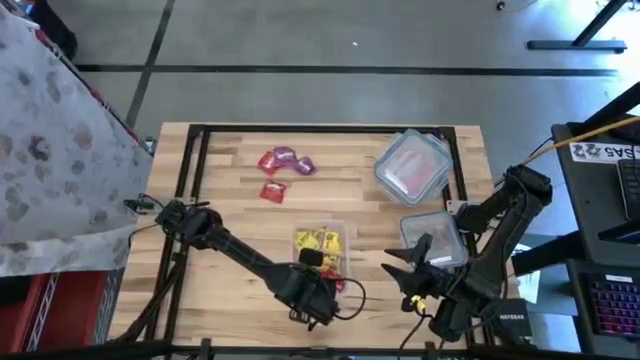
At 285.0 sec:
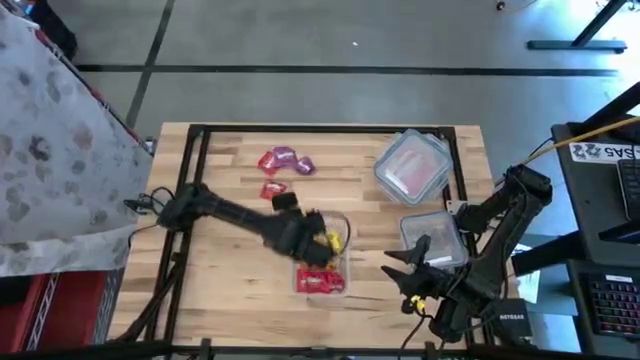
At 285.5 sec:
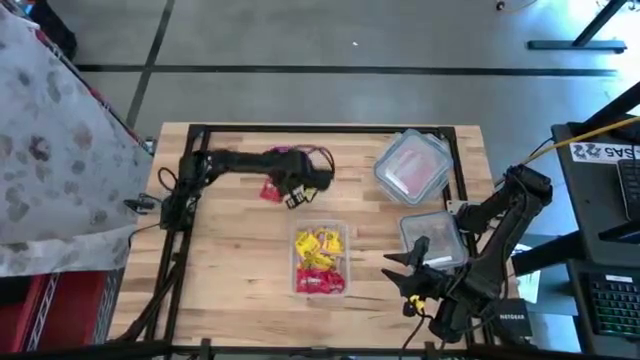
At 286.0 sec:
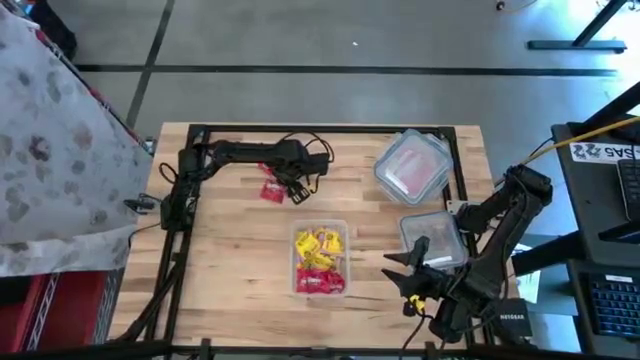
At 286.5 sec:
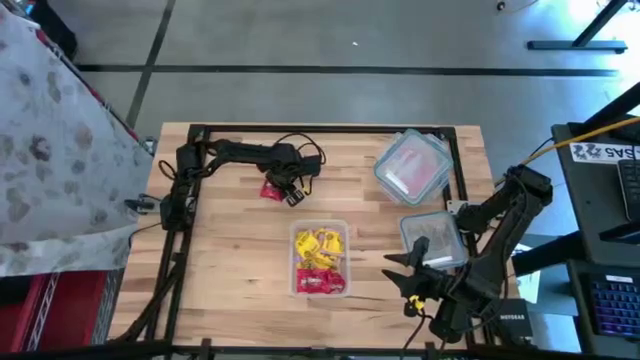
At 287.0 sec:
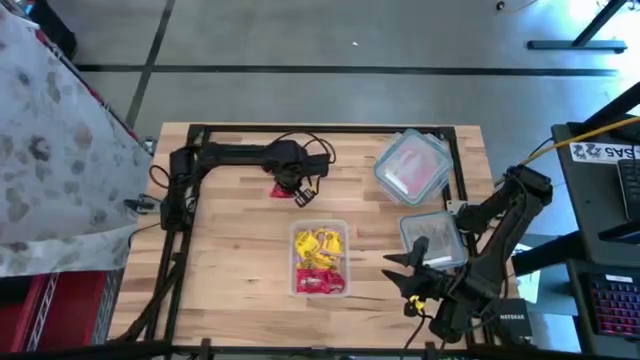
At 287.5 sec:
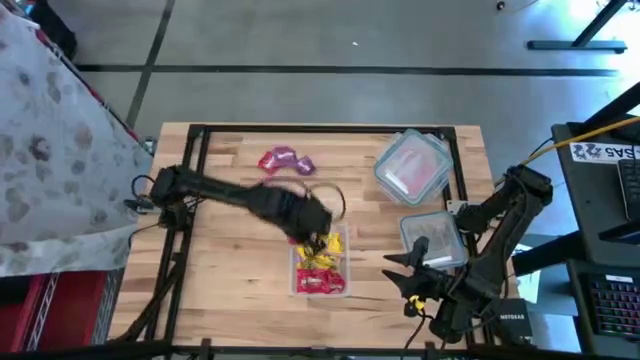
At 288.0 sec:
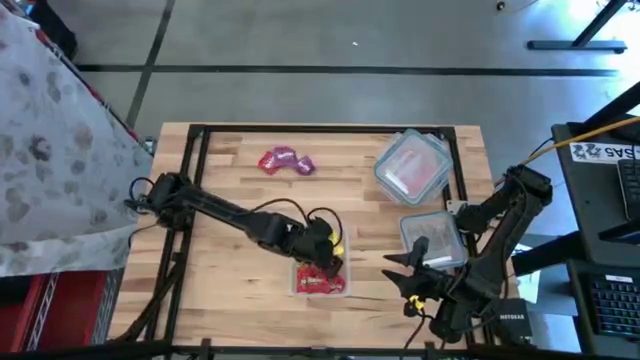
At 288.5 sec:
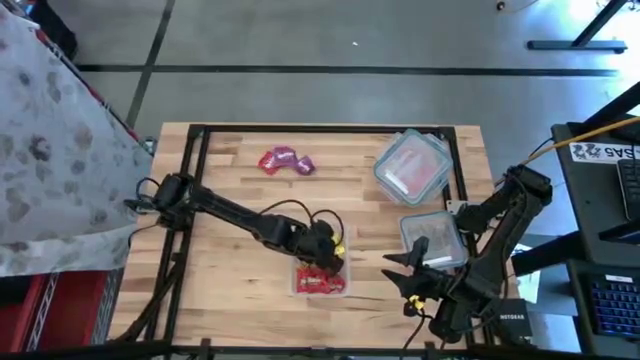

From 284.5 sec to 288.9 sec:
Task: Sort candy
Put the red candy into the rectangular transparent food container

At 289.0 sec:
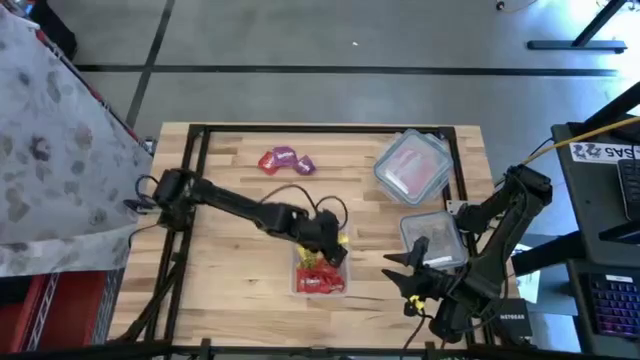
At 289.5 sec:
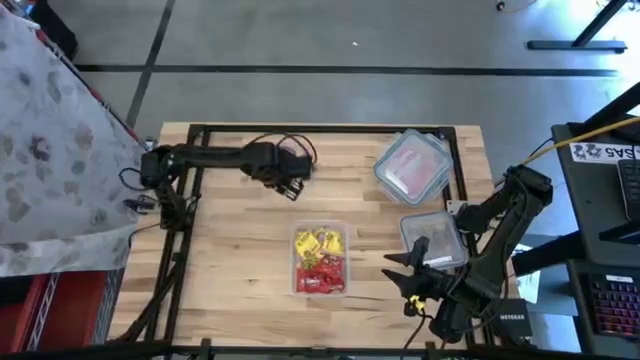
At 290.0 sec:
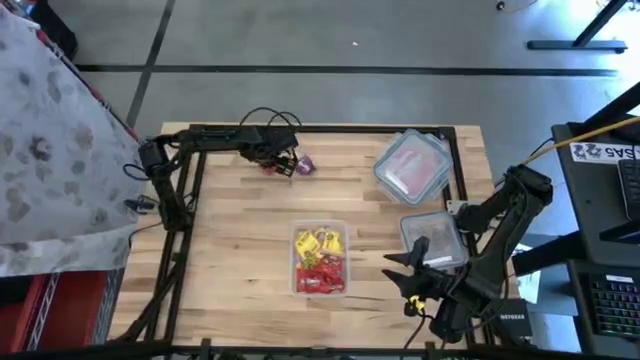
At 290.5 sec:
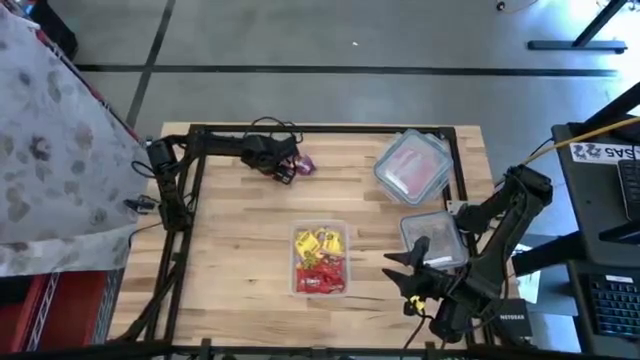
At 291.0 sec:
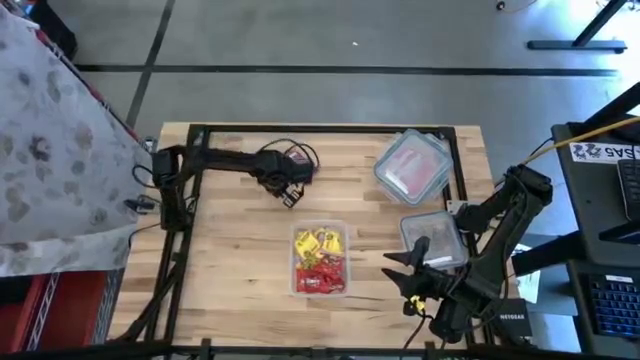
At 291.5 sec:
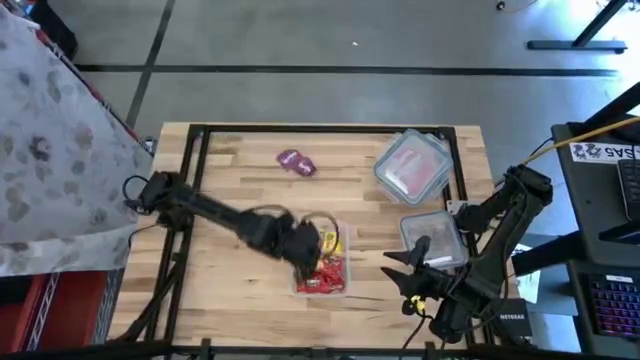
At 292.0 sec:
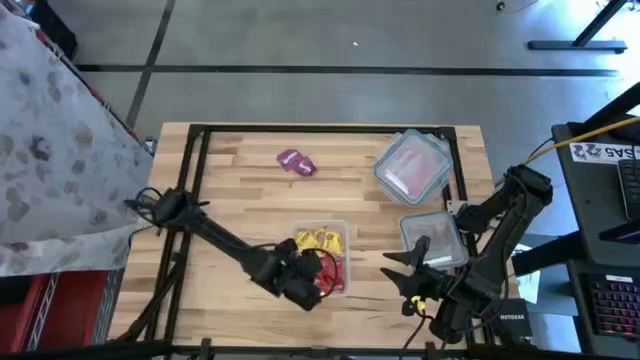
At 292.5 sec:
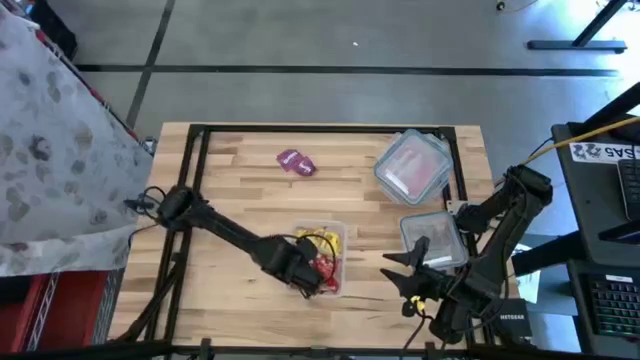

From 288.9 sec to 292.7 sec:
Put the red candy into the rectangular transparent food container

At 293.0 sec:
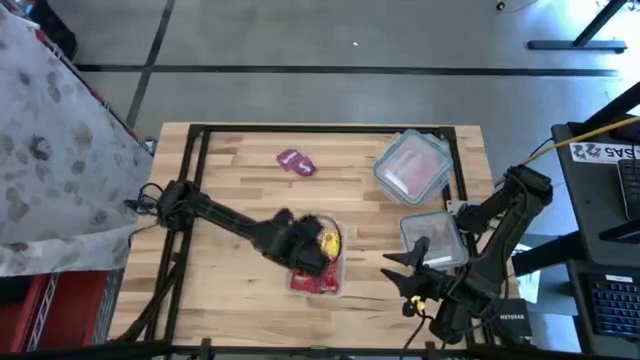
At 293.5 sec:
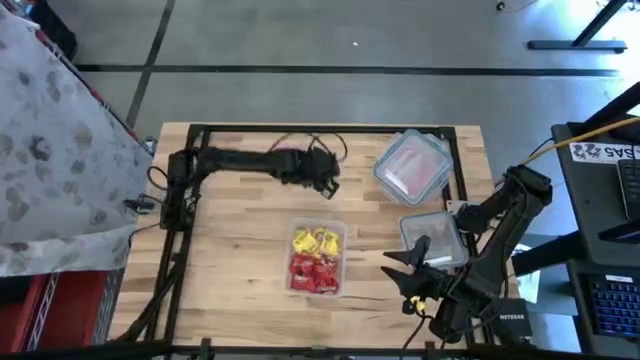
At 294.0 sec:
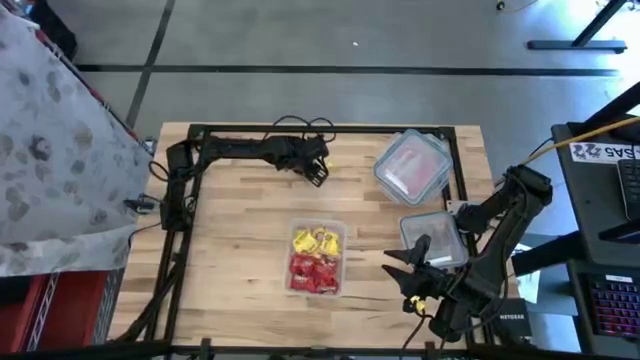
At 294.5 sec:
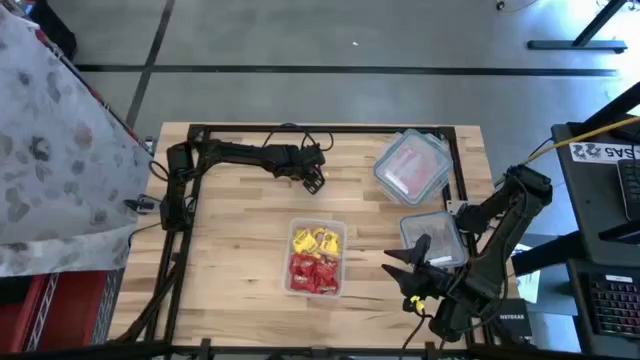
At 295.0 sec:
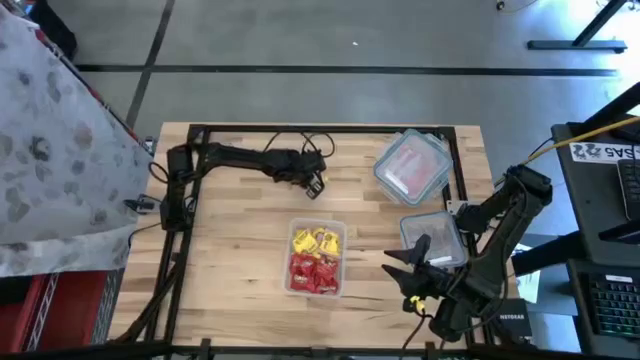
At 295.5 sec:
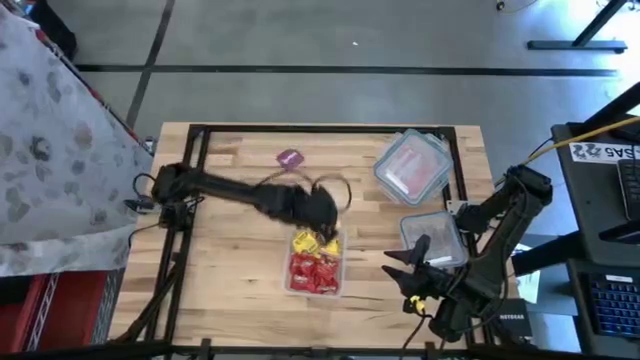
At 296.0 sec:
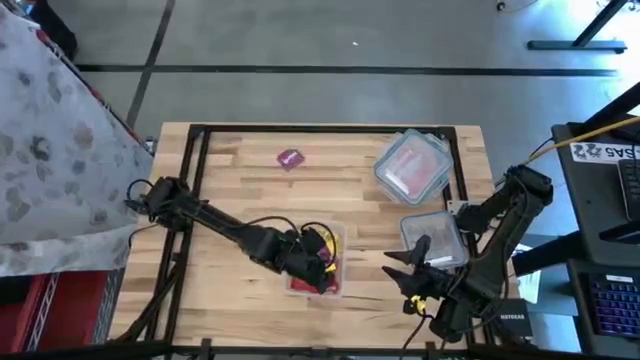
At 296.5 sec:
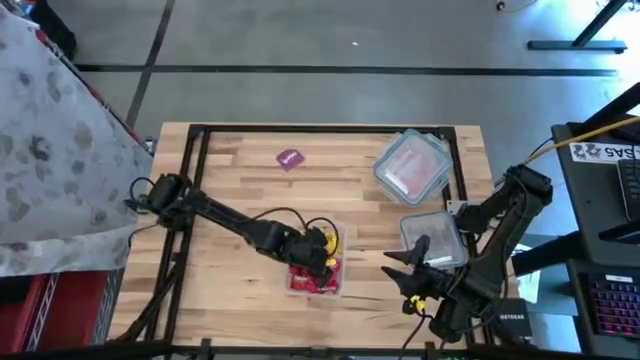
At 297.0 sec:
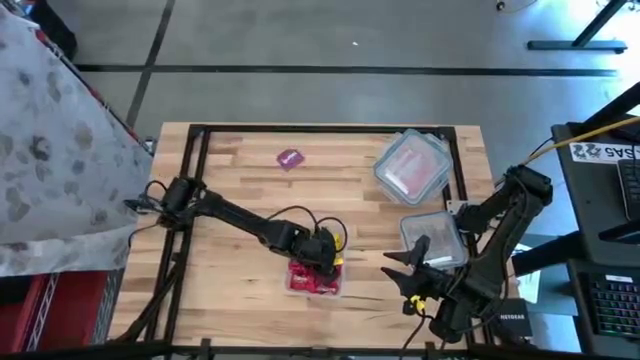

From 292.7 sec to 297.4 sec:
Put the violet candy into the rectangular transparent food container

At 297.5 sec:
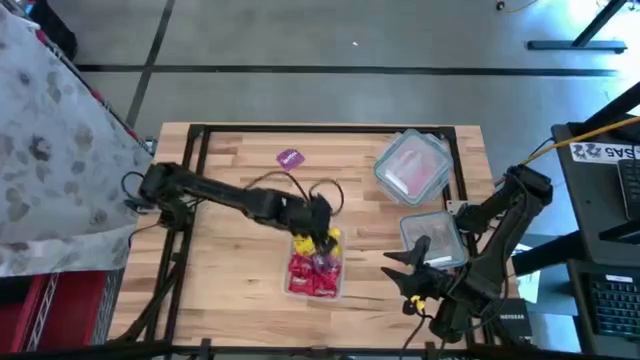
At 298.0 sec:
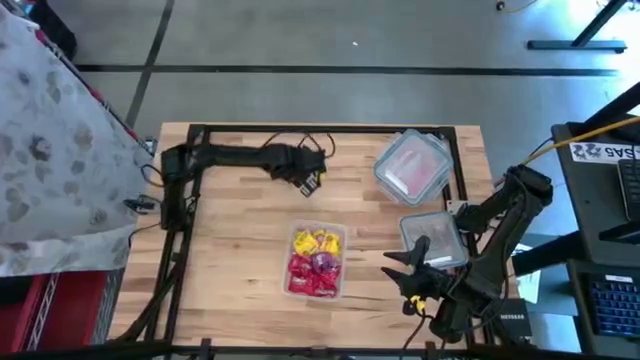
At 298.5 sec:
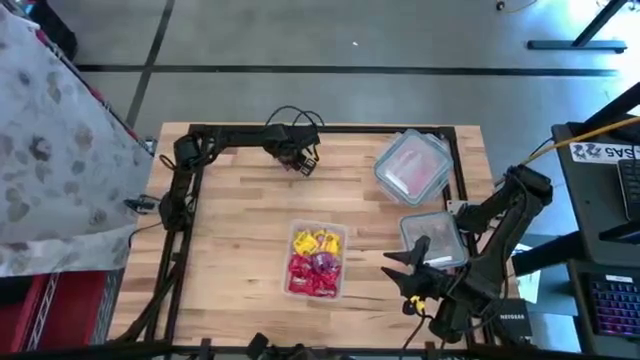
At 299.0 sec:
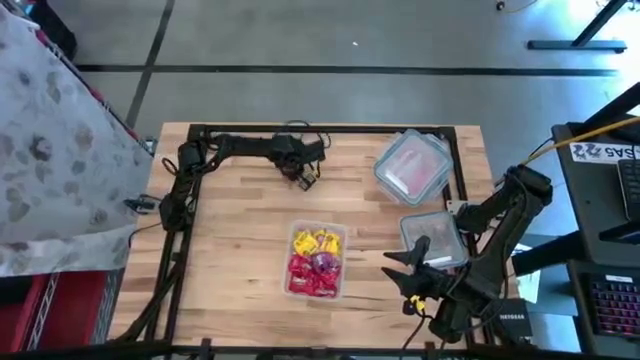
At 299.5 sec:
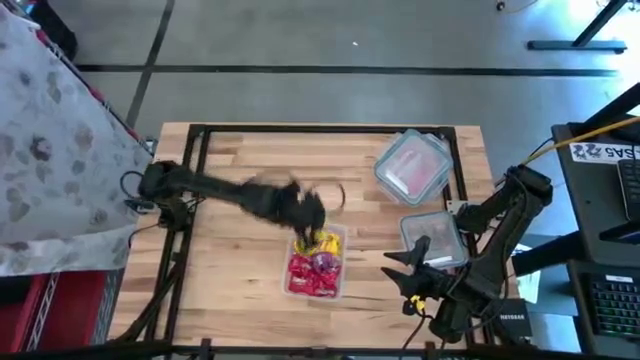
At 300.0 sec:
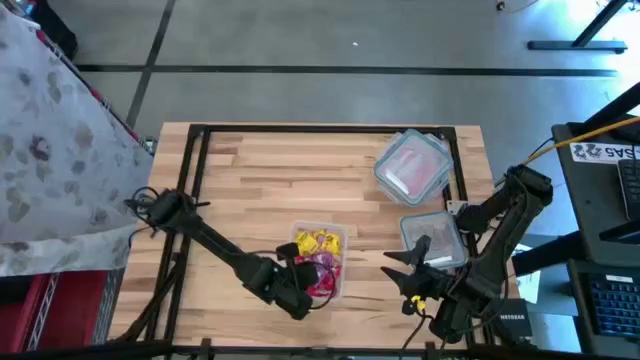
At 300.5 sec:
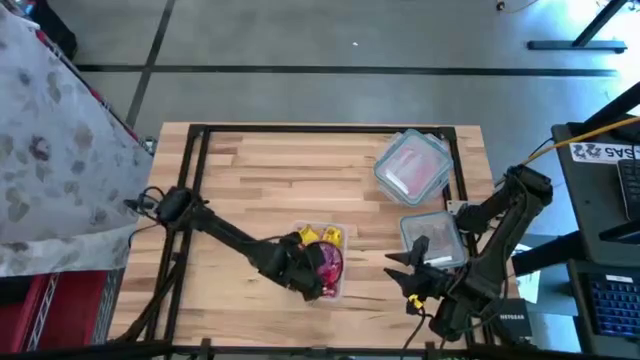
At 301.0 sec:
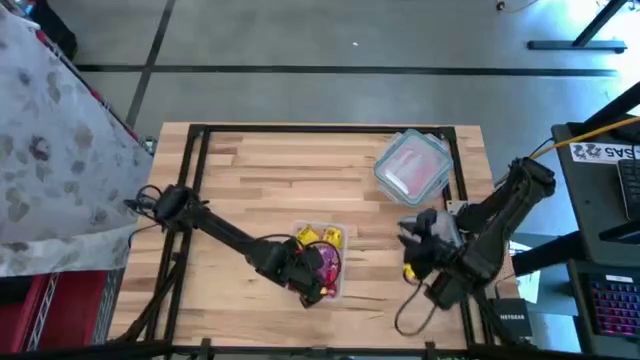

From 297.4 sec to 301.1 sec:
Put the violet candy into the rectangular transparent food container

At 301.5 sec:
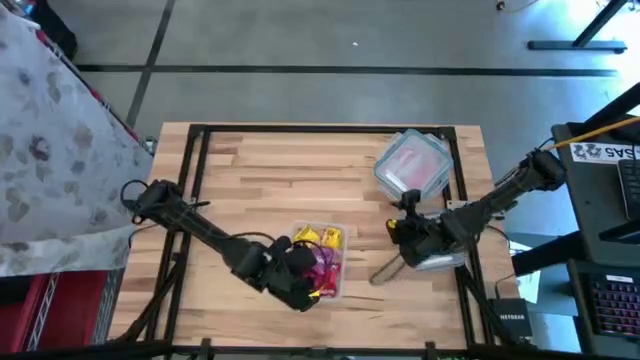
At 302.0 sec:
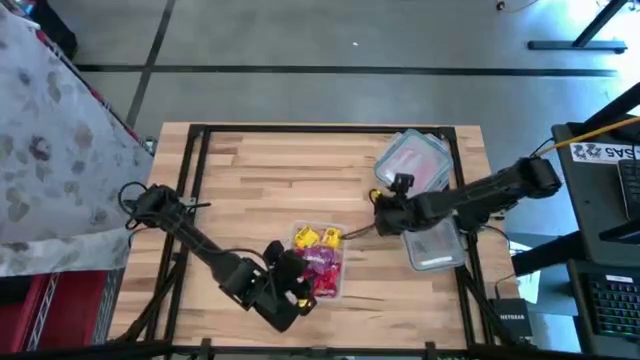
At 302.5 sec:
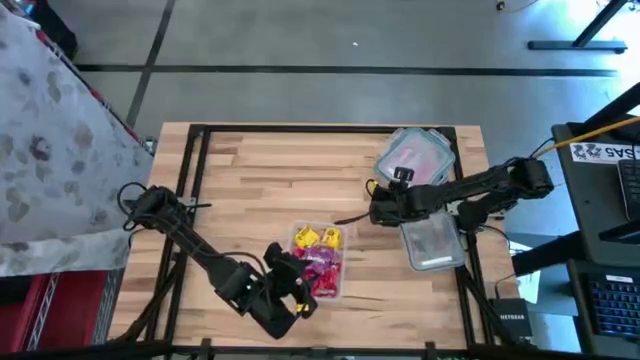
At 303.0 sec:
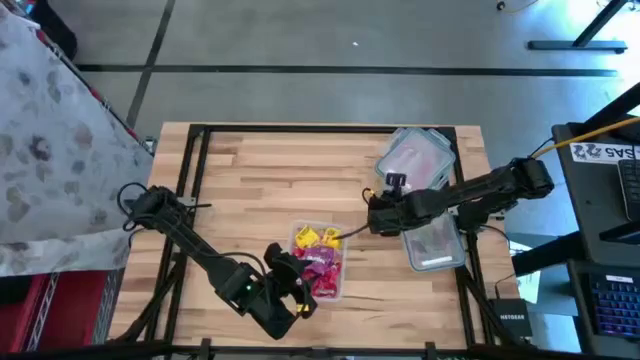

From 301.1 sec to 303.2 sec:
Close the rectangular transparent food container
